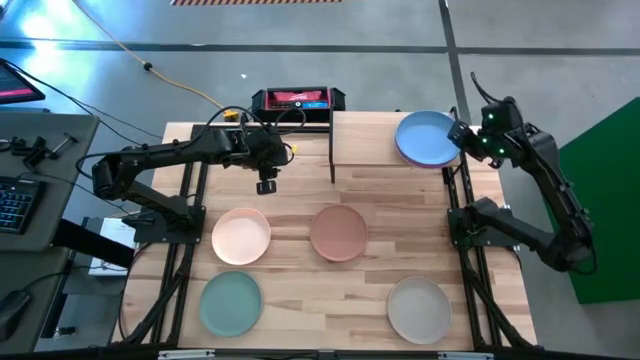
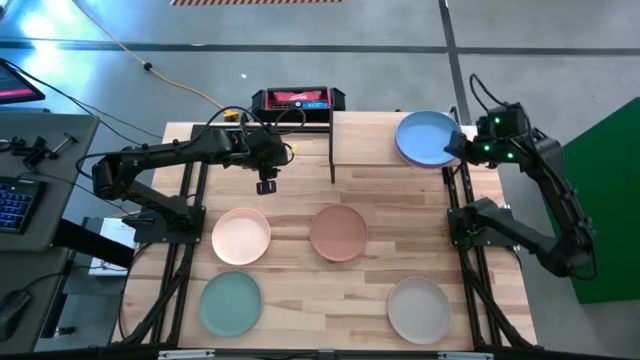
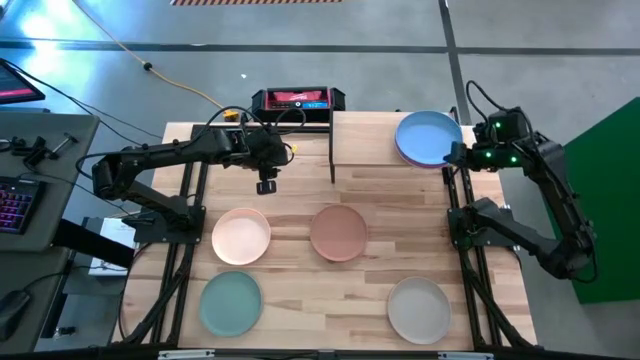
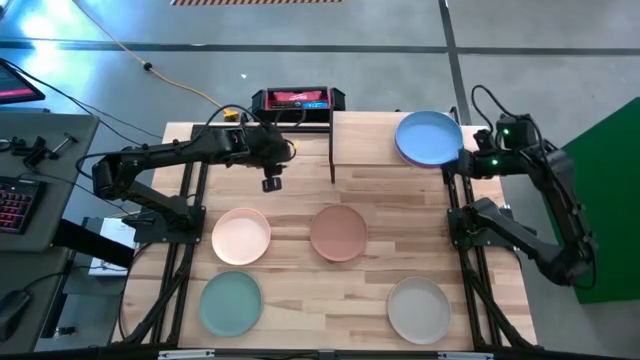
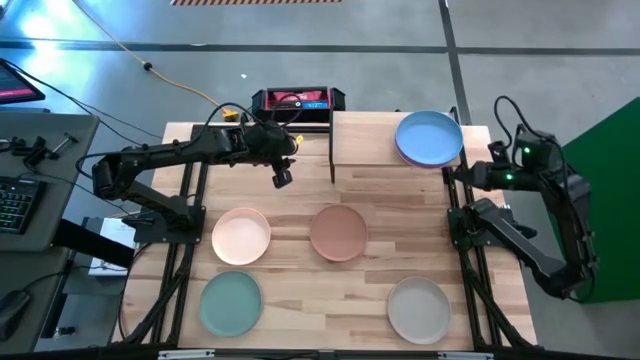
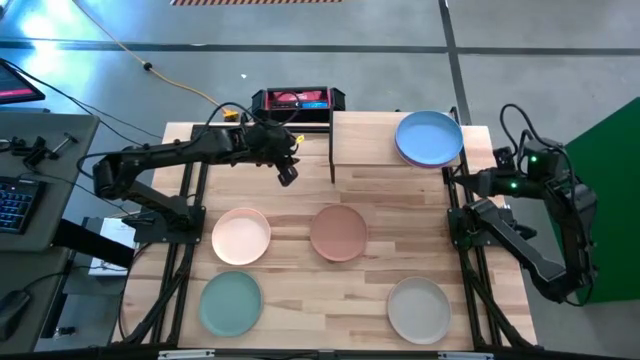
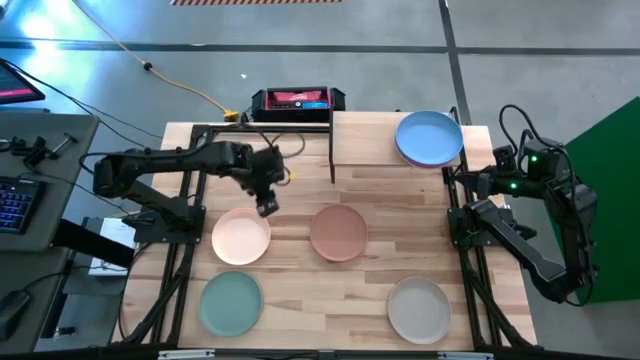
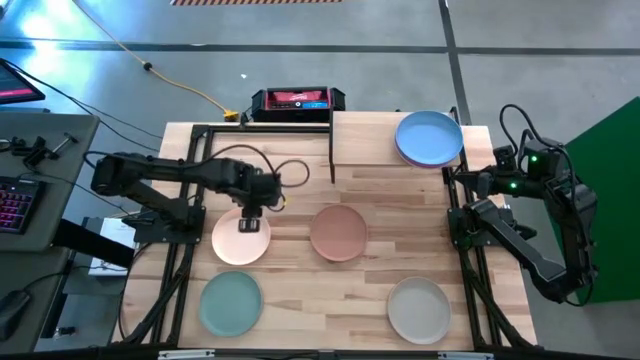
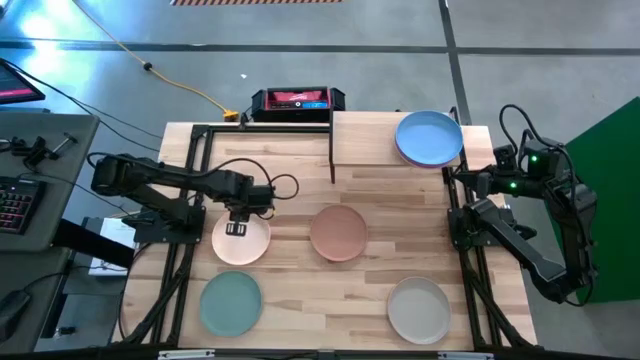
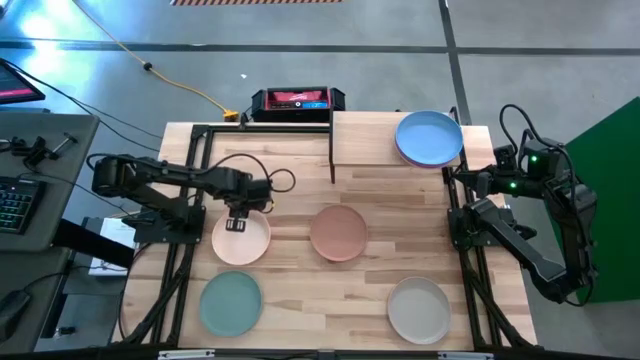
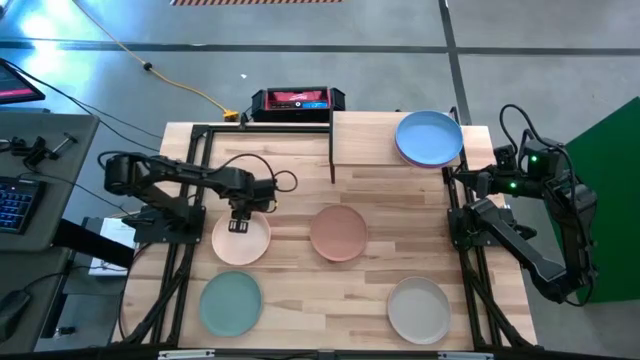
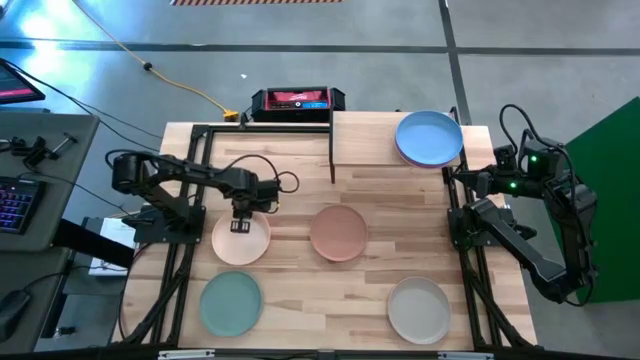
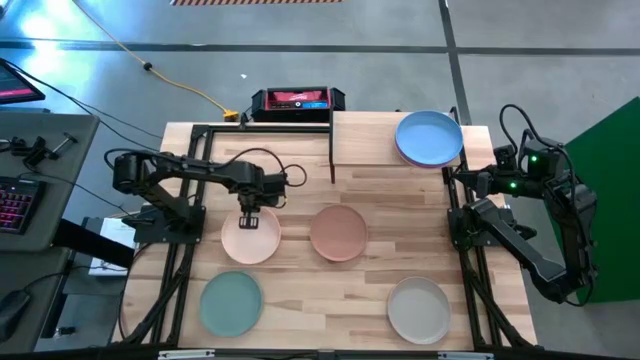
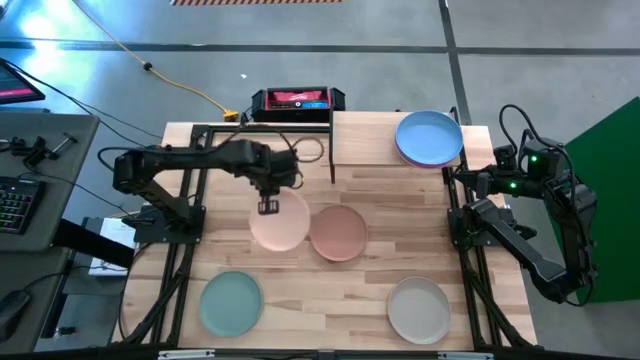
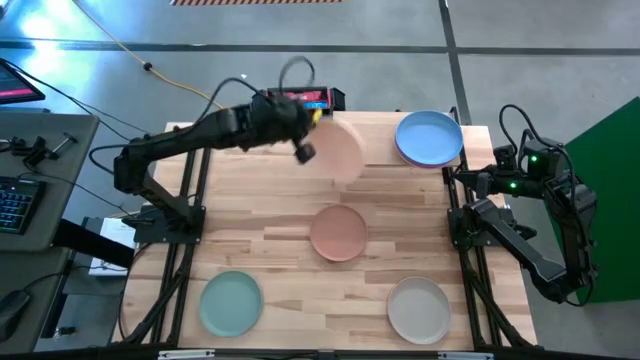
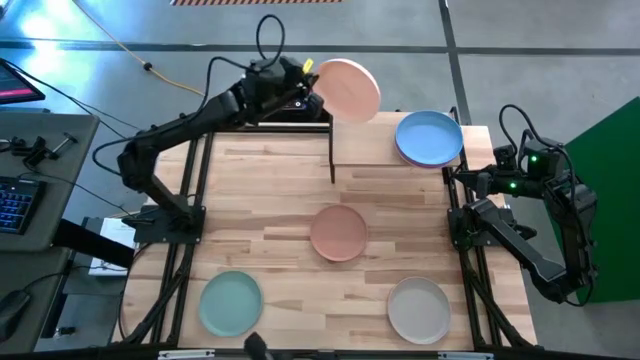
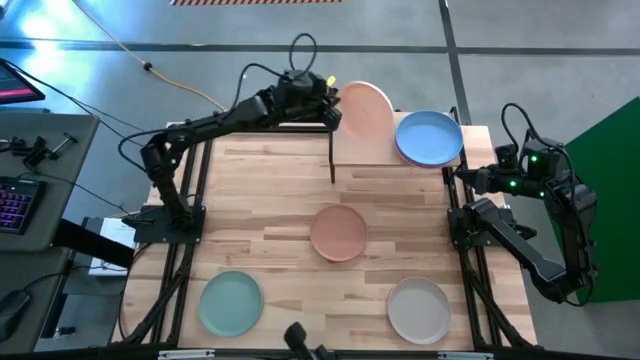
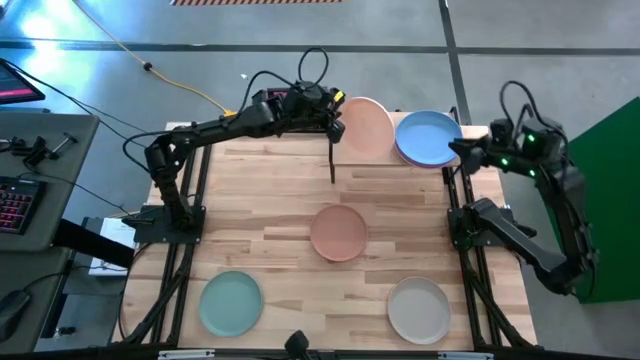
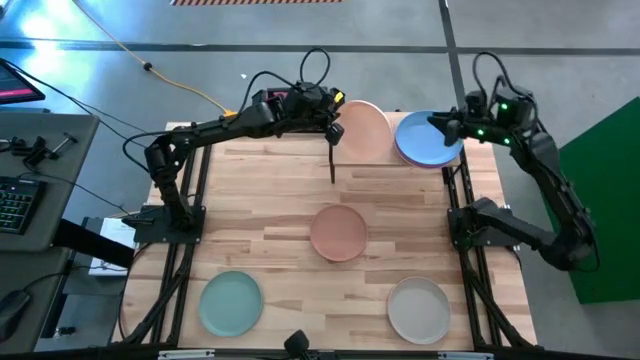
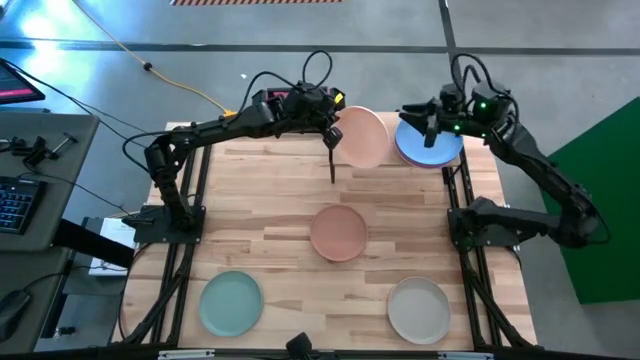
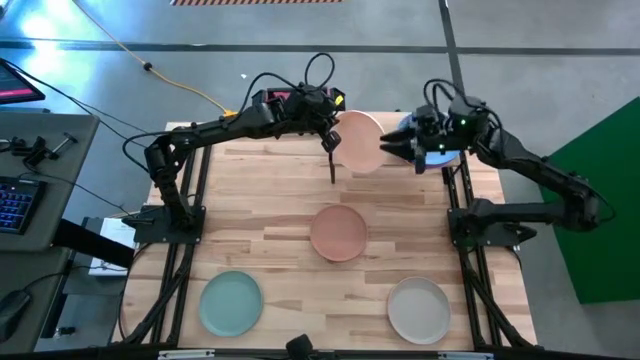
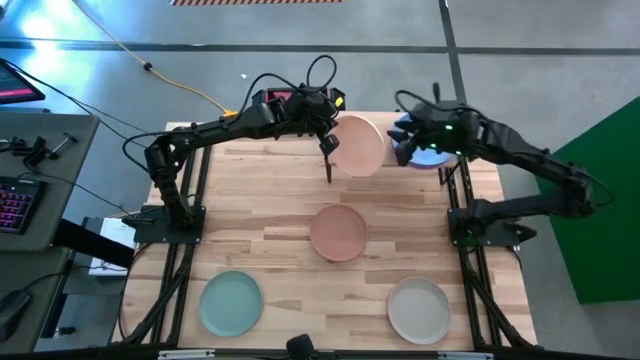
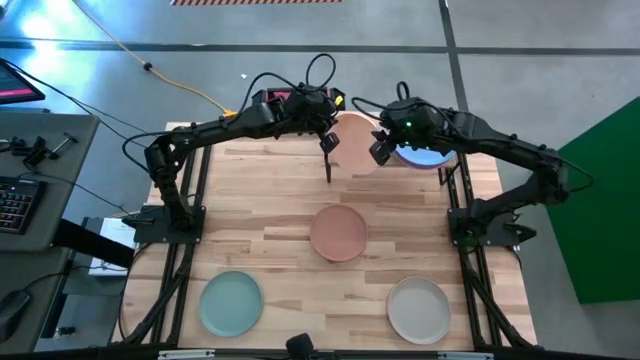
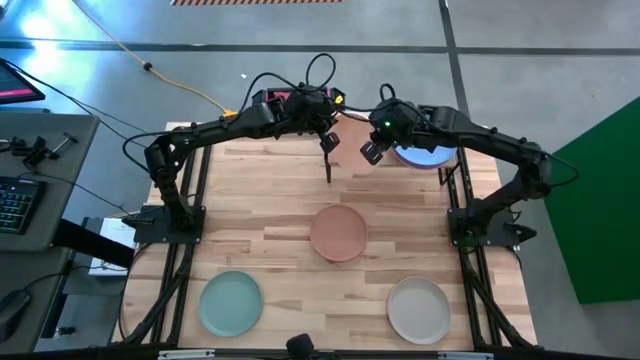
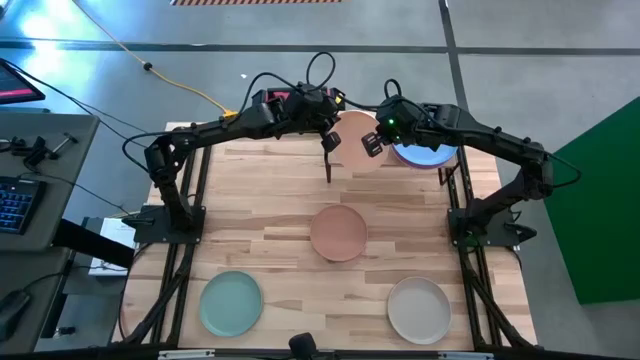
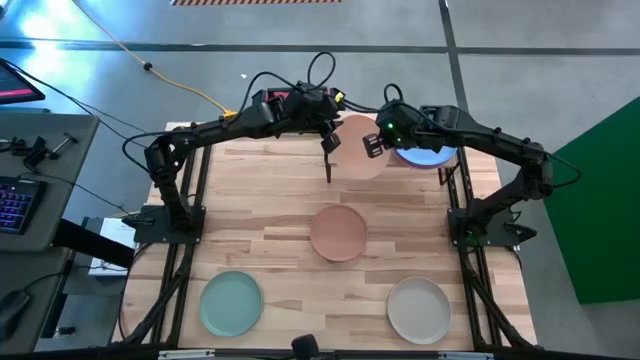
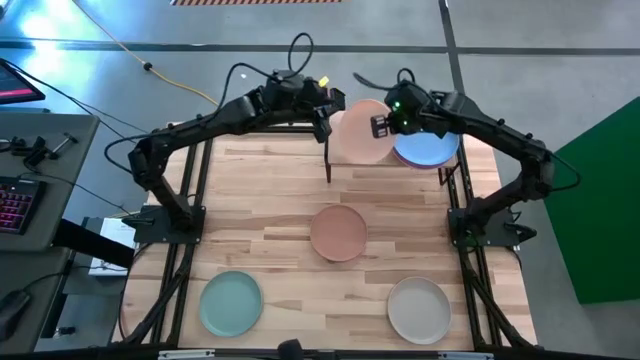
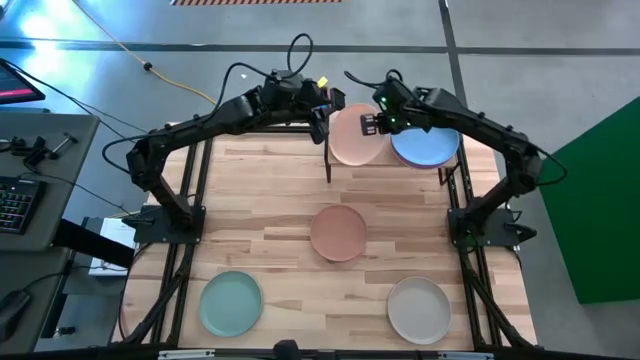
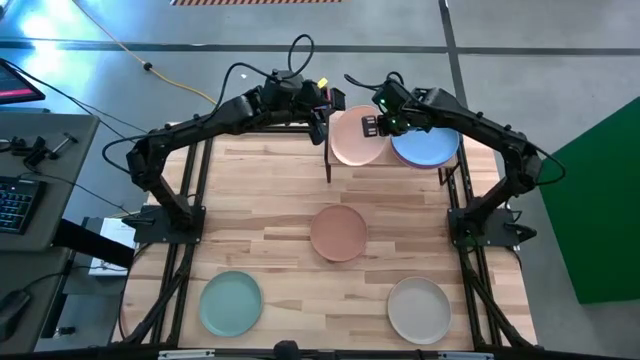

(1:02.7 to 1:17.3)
Task: Place and stack plates onto a shelf
Put the light orange plate on the shelf

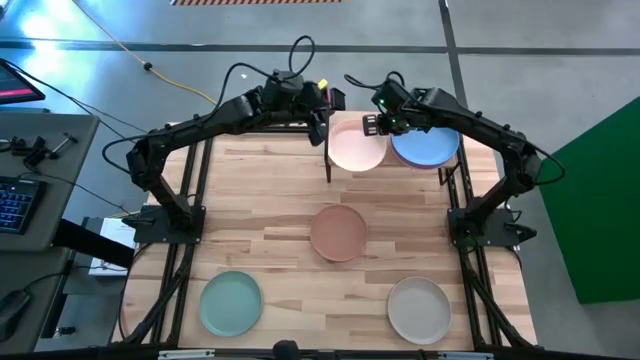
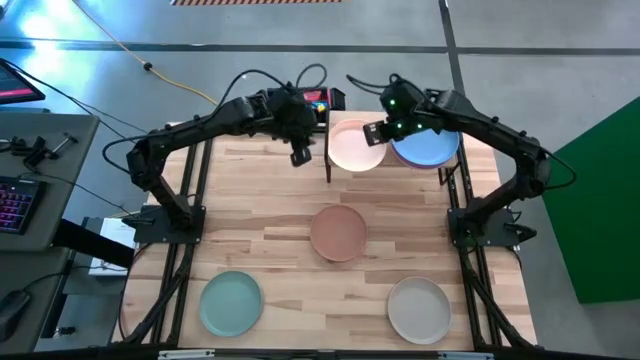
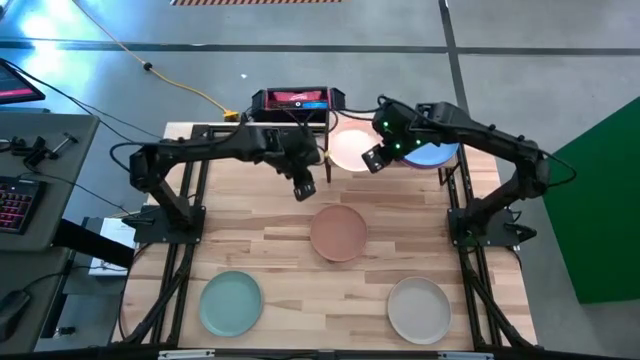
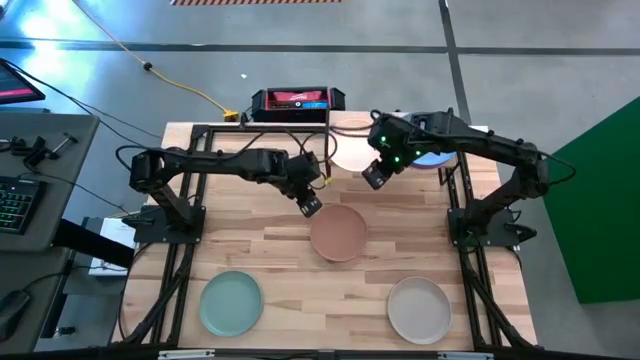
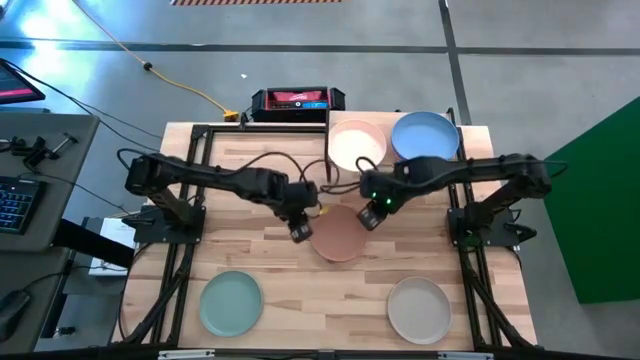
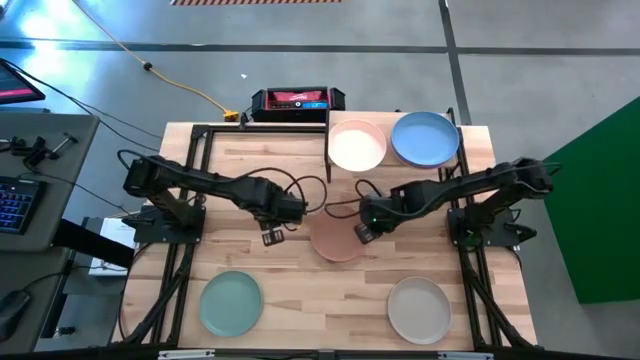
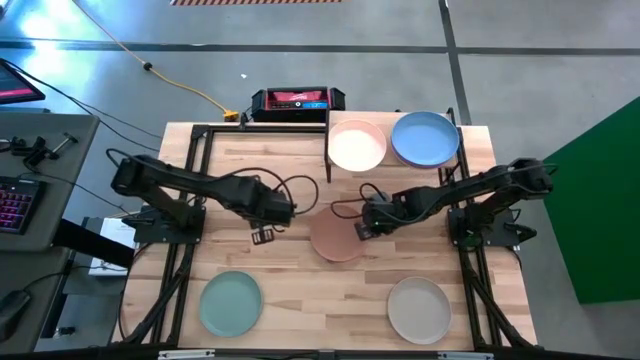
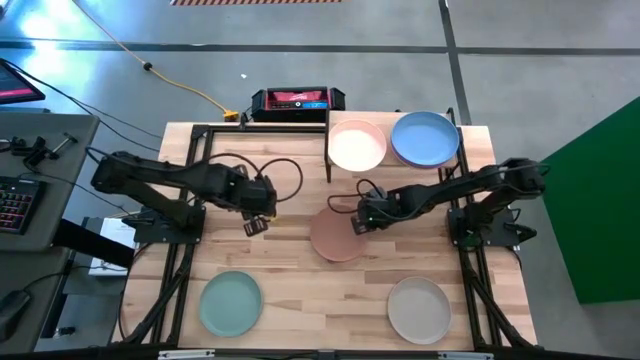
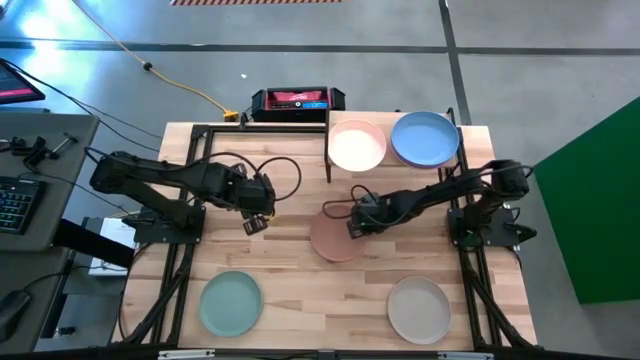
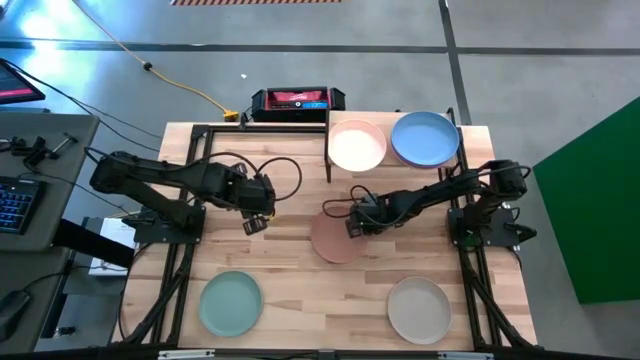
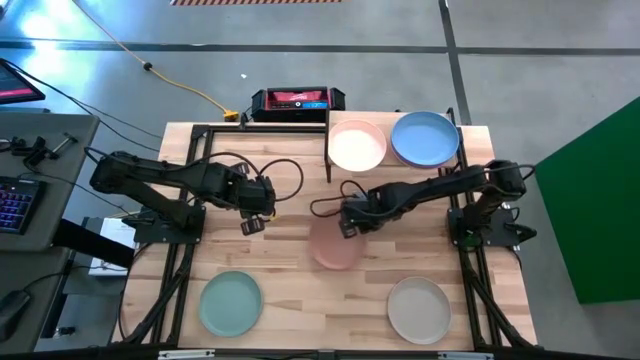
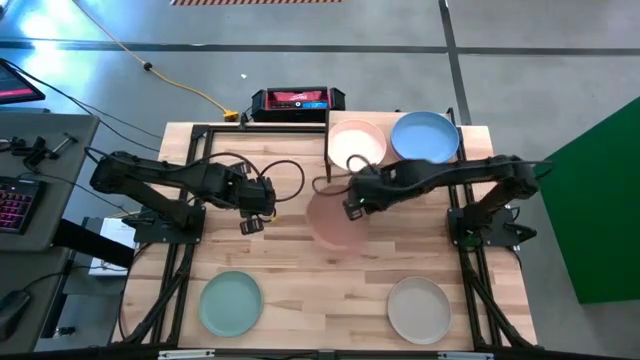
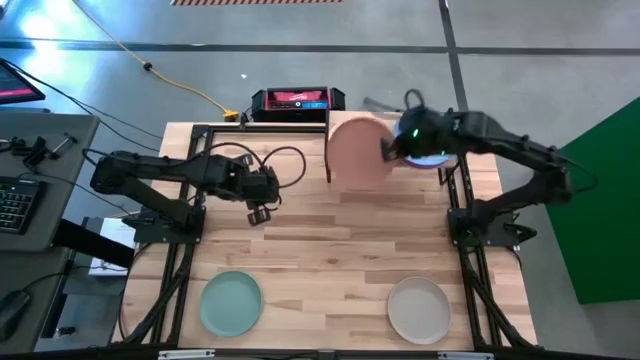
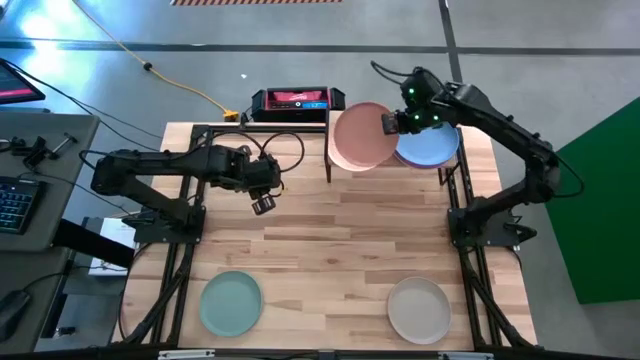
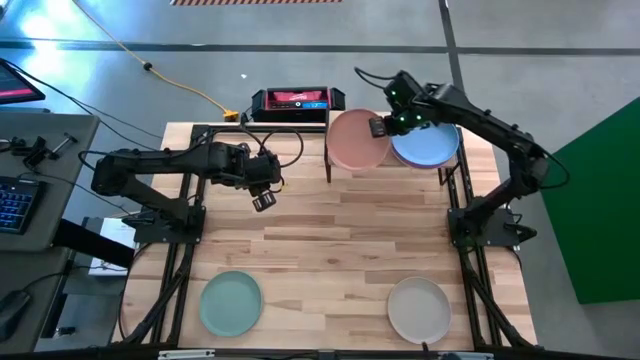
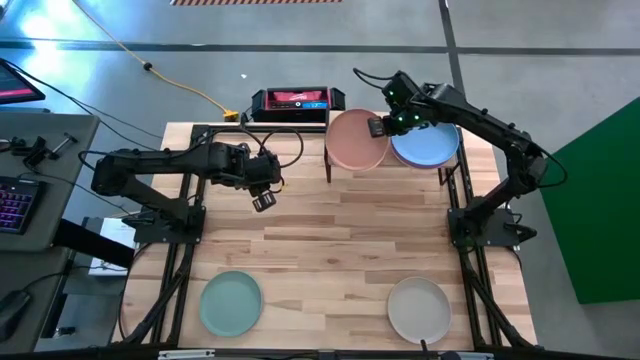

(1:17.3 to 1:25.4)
Stack the brown plate on top of the light orange plate on the shelf
